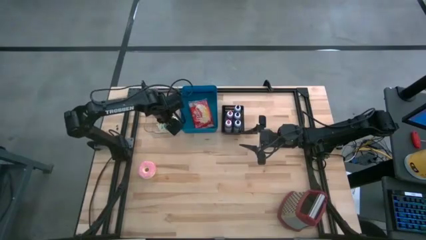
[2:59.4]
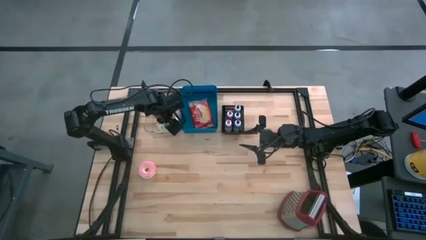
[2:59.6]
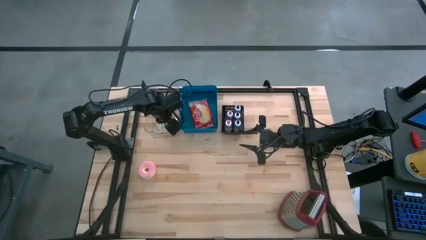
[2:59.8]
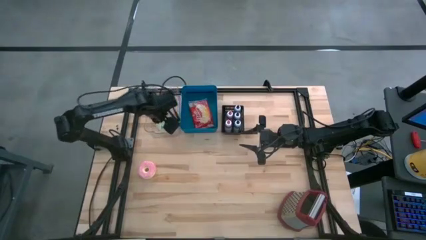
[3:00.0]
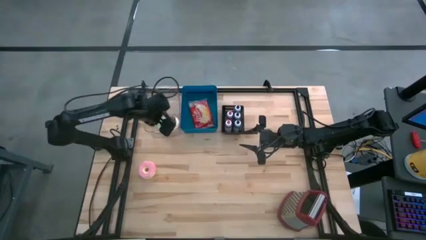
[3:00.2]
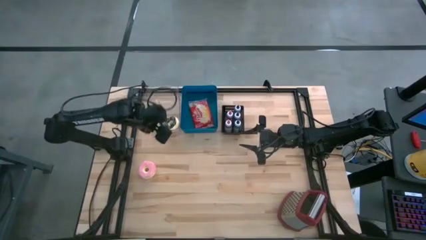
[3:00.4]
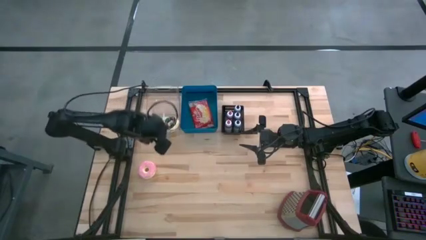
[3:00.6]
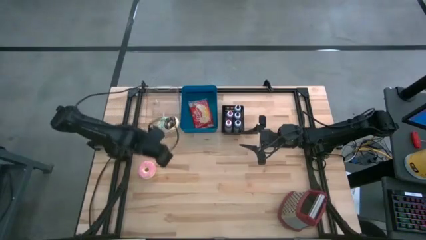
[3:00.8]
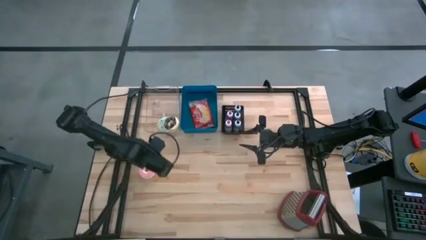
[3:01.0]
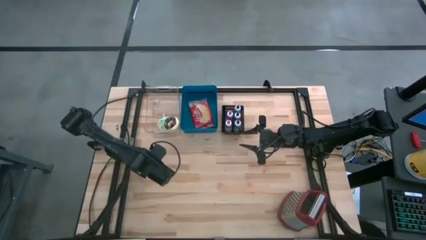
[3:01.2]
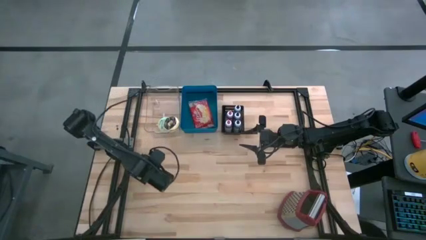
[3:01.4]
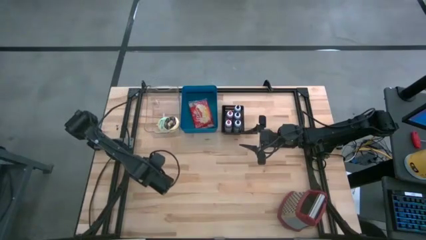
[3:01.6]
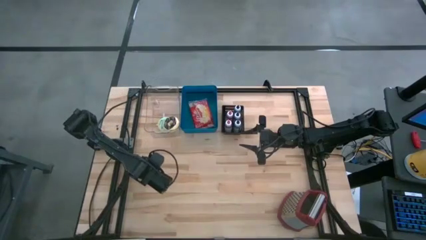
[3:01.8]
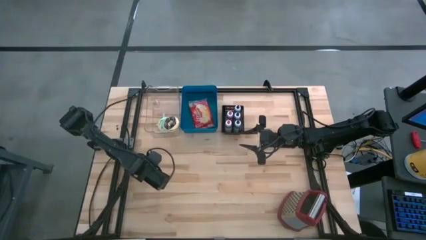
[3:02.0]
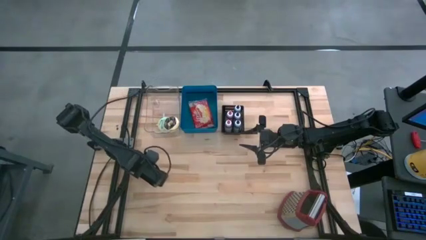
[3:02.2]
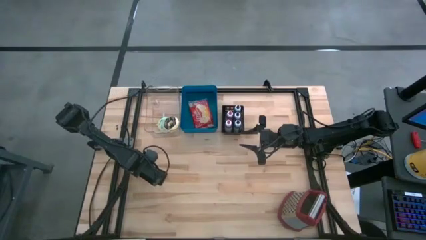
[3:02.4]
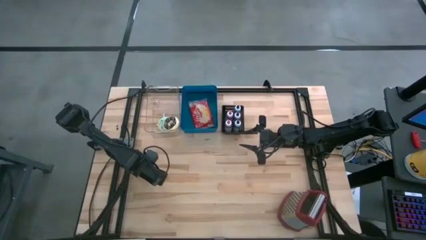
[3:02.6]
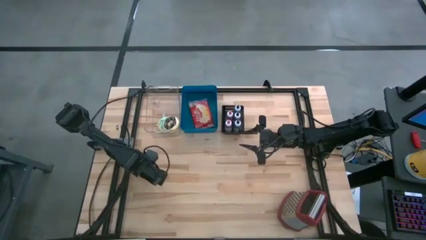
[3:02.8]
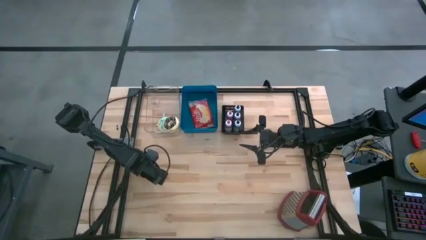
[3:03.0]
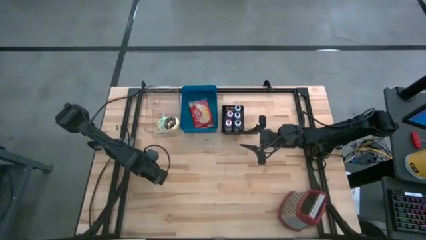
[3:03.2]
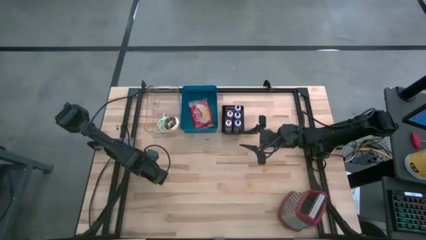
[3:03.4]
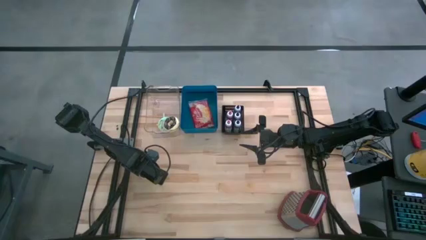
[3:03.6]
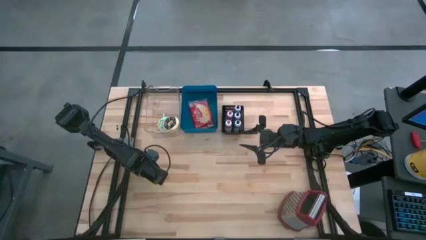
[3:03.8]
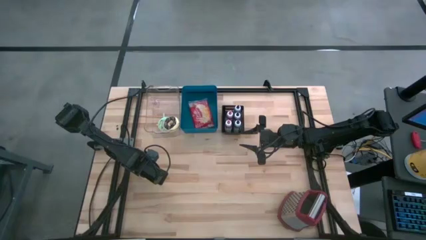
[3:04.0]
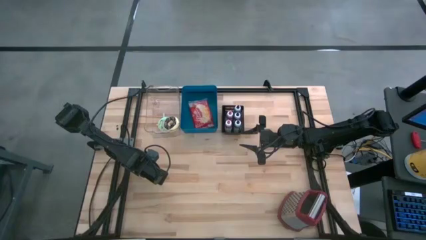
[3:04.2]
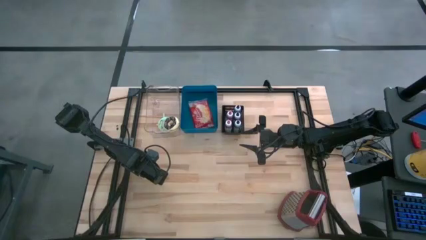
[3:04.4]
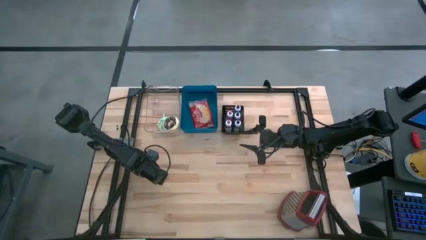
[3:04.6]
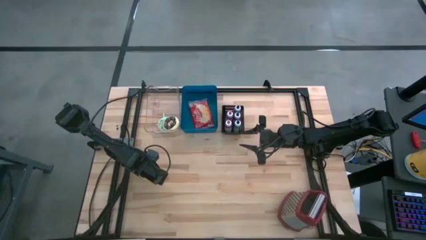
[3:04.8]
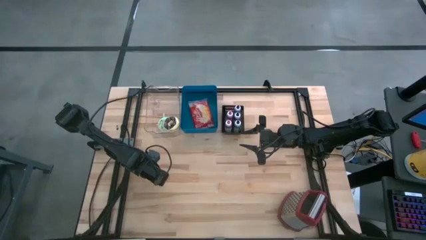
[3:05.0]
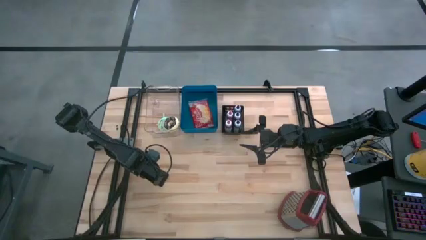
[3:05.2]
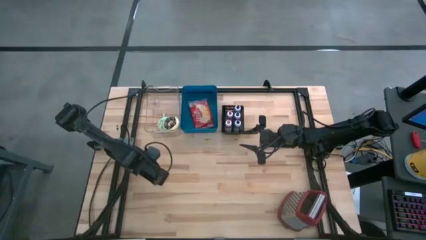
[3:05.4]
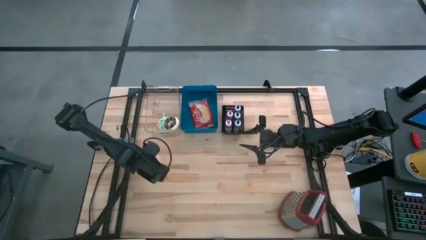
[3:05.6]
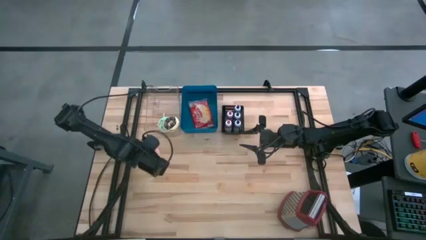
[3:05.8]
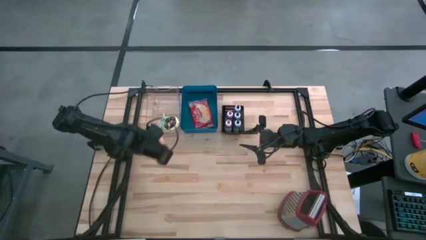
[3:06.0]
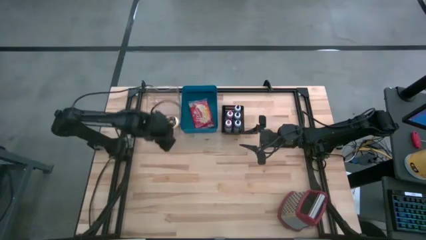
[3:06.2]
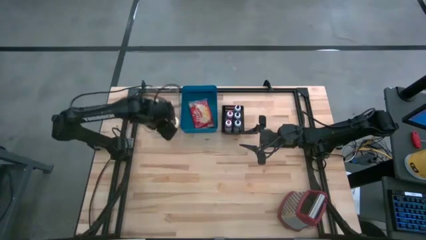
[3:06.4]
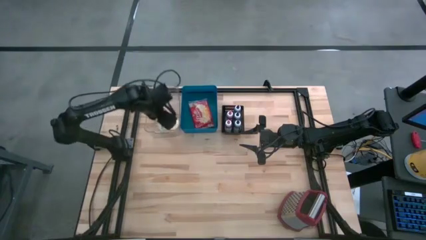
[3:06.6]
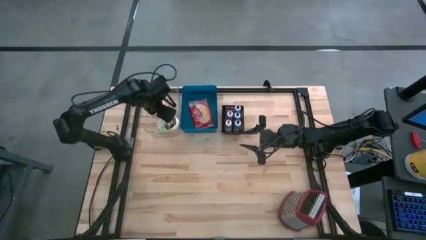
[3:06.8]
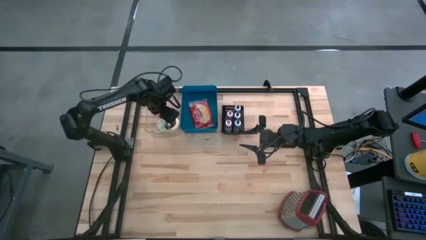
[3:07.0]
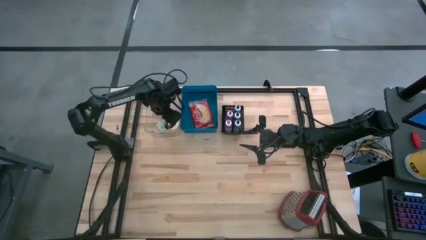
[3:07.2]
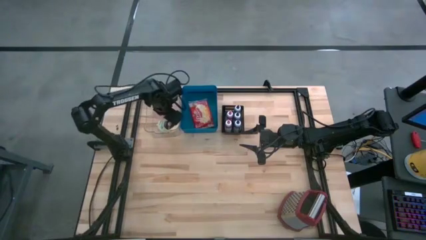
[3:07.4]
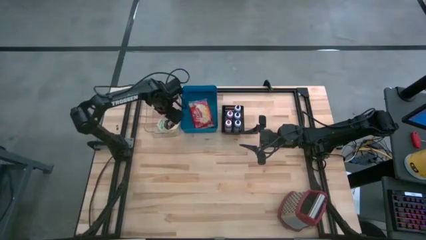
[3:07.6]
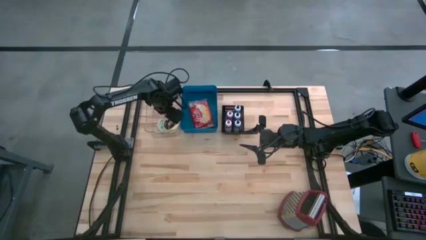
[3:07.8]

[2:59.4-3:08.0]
Put the pink donut into the transparent bin

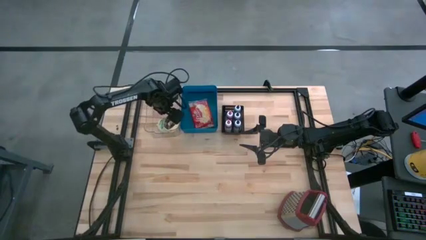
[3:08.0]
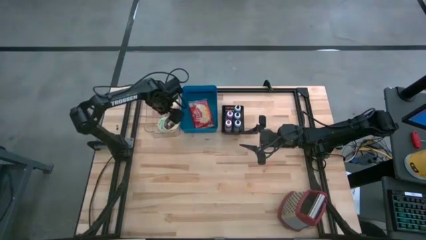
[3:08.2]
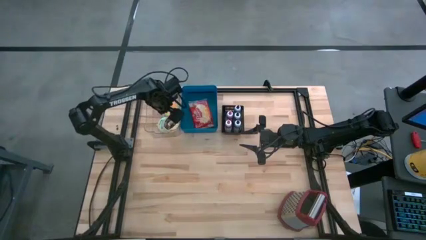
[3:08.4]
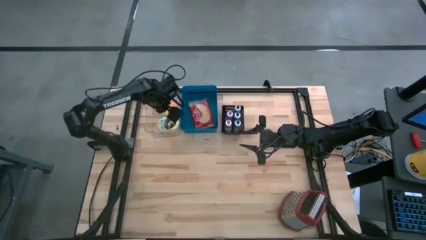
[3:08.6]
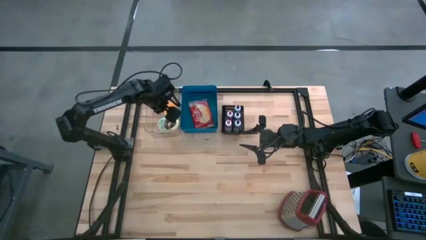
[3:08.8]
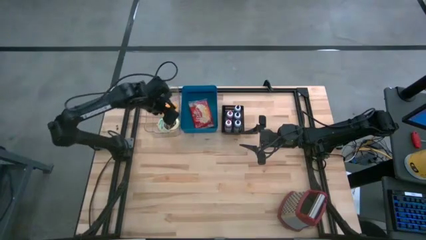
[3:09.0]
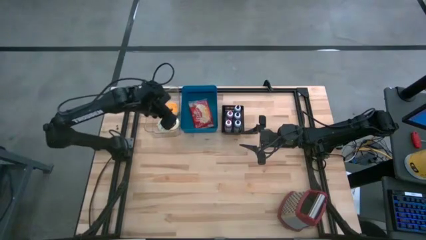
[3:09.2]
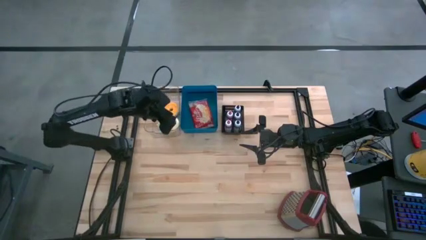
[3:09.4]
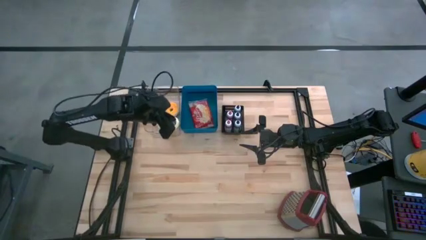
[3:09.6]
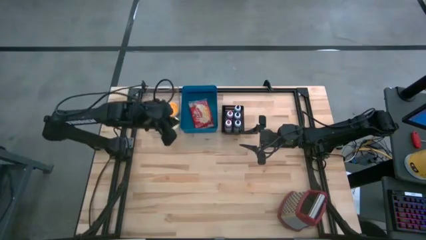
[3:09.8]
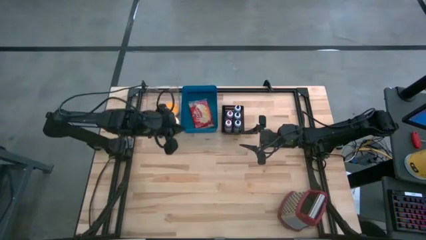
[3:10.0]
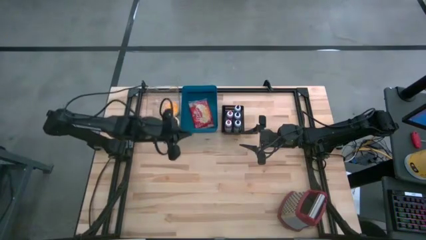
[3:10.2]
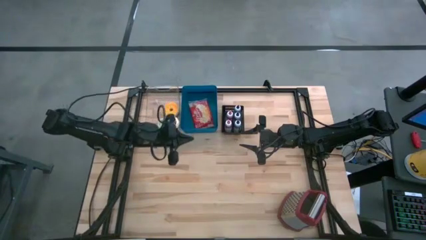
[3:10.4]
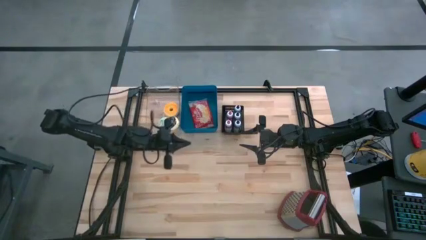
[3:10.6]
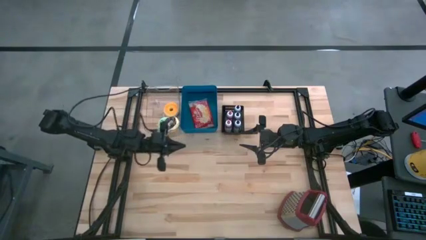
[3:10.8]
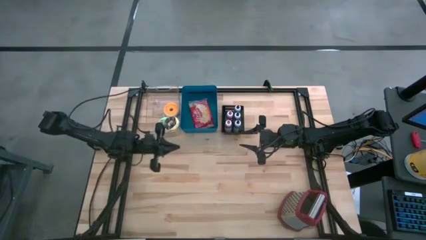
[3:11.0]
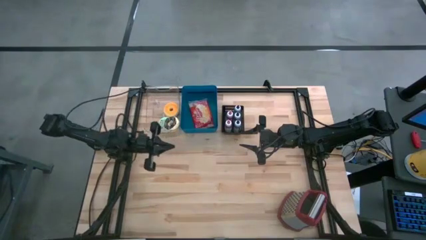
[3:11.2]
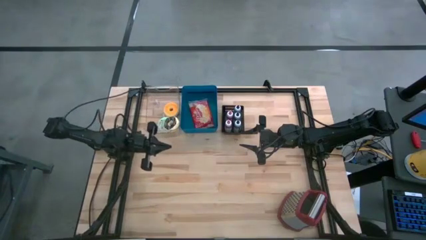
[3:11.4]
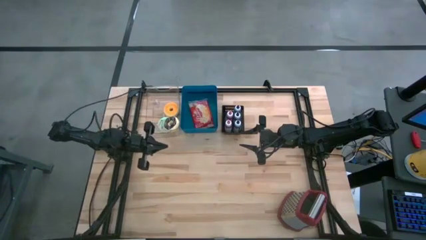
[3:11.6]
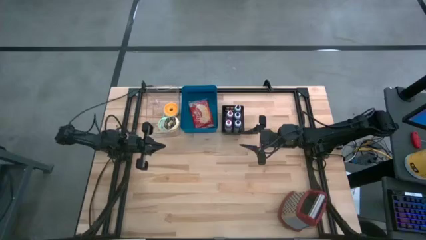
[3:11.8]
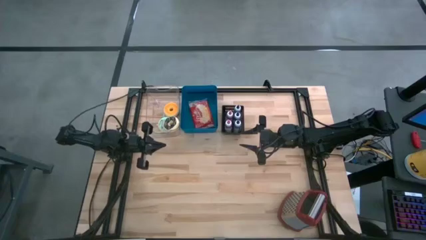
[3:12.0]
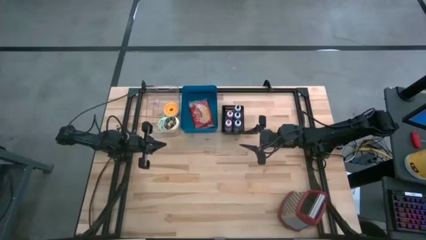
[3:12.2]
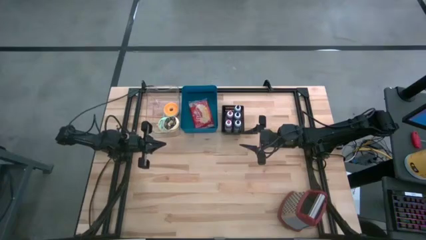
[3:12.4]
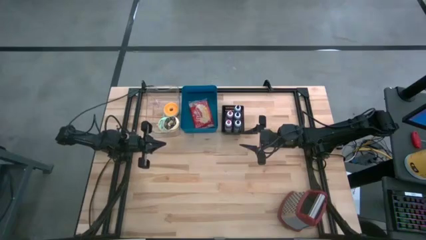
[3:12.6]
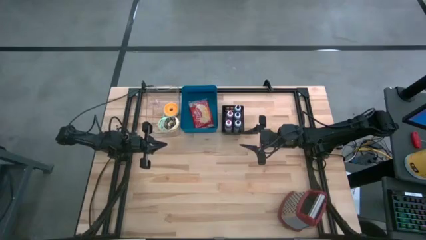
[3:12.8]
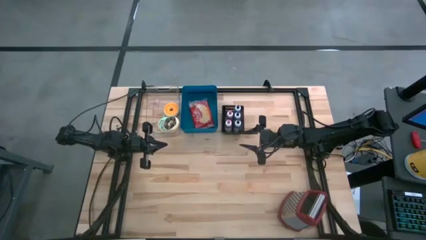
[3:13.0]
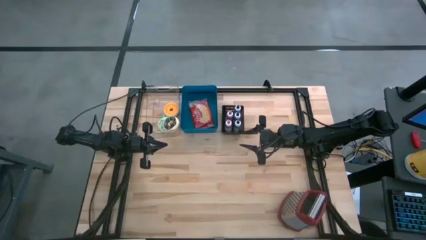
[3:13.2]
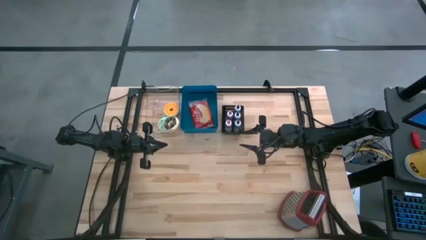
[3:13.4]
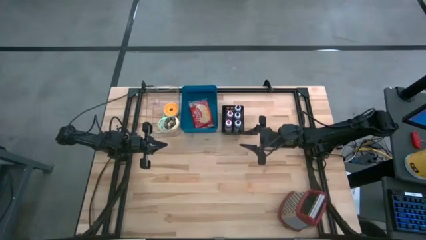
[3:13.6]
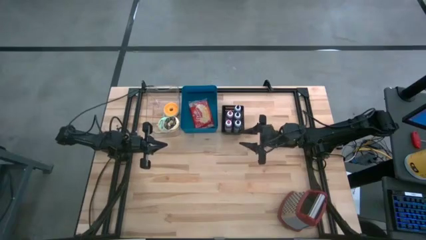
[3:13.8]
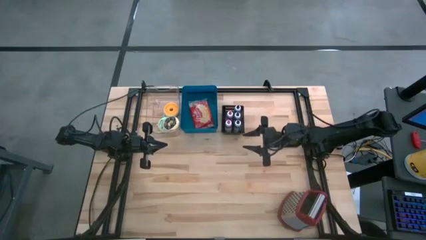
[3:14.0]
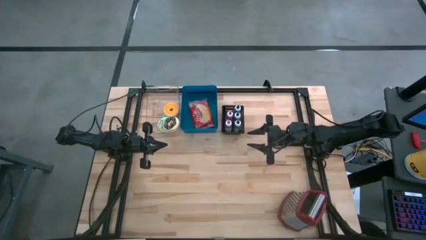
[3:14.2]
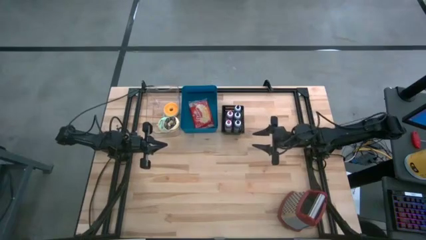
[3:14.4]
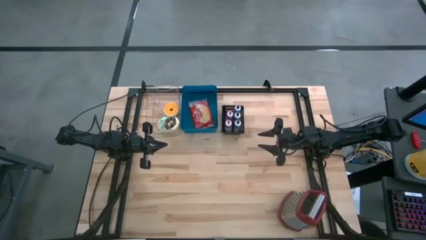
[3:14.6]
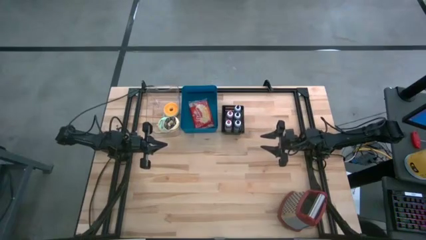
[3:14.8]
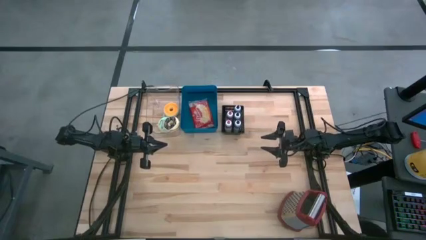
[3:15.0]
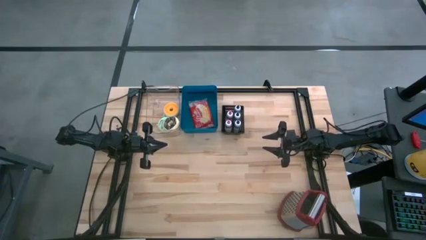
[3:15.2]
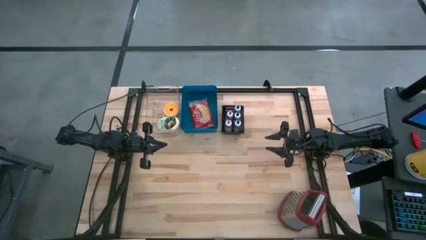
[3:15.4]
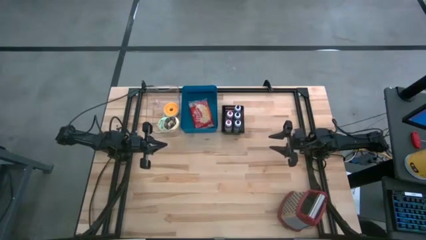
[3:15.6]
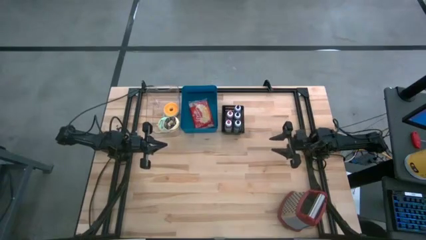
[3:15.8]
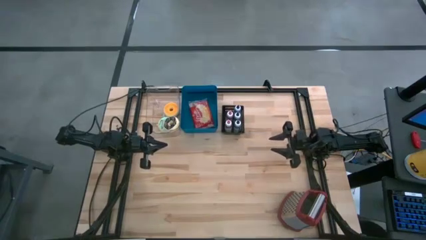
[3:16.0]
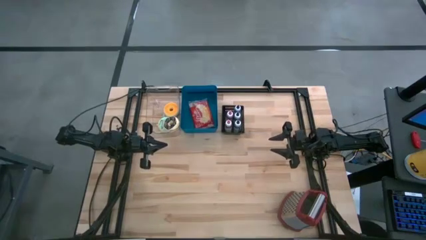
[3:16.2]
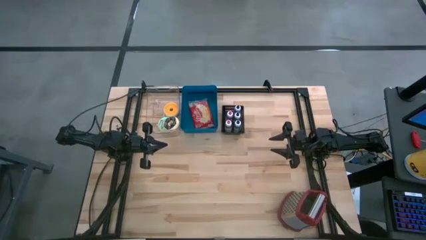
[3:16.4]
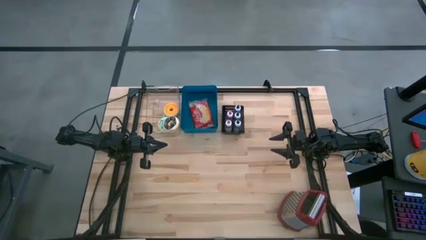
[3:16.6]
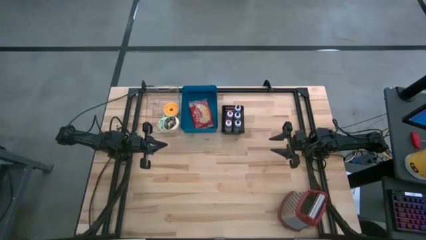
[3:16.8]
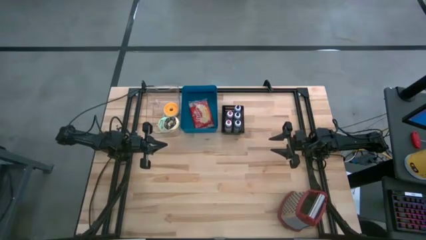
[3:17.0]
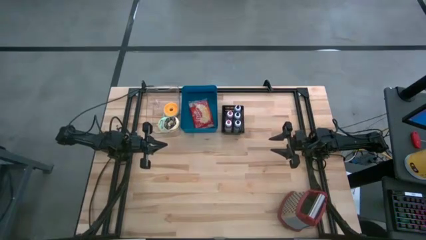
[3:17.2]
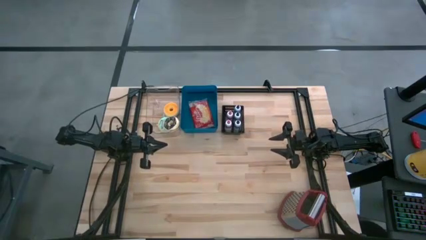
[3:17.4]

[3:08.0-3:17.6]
Return to Home Position
